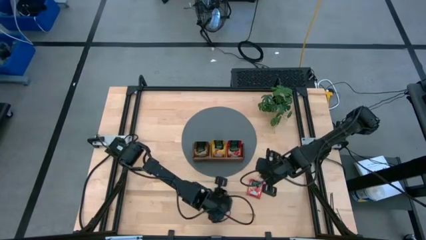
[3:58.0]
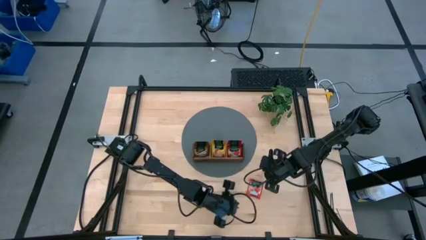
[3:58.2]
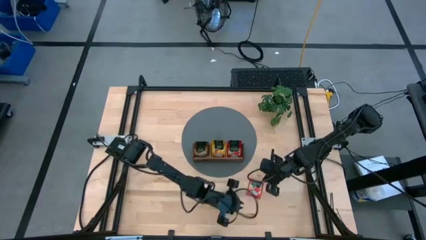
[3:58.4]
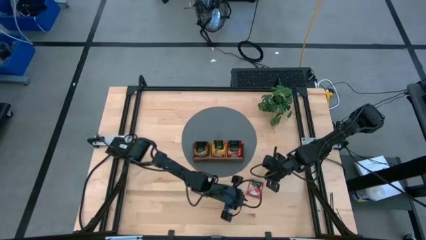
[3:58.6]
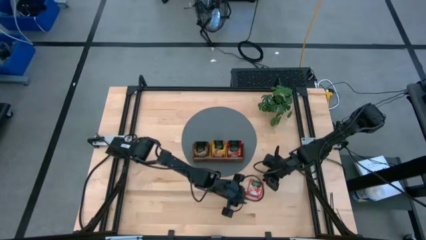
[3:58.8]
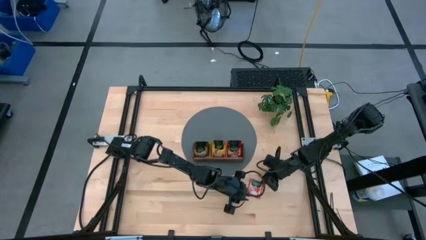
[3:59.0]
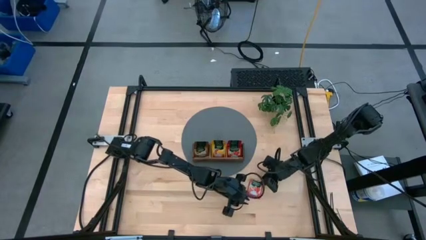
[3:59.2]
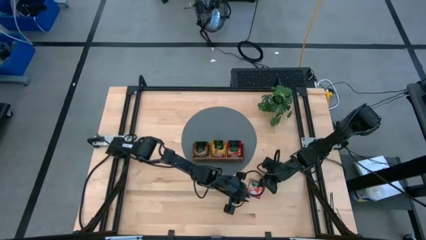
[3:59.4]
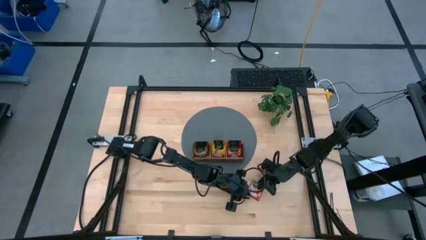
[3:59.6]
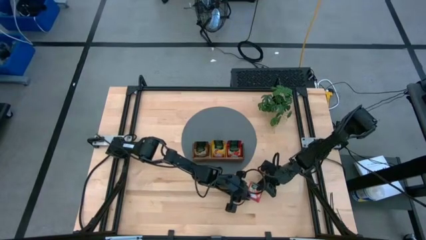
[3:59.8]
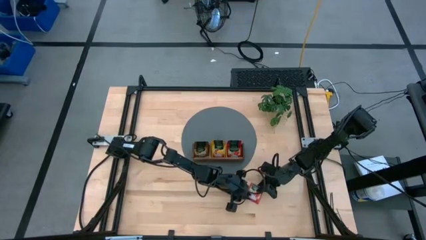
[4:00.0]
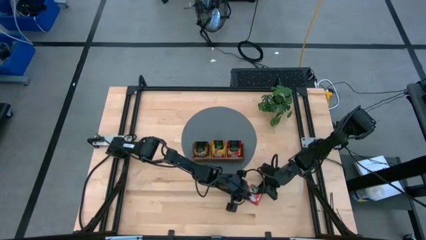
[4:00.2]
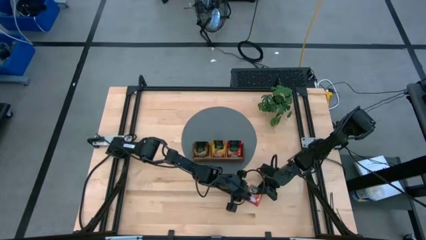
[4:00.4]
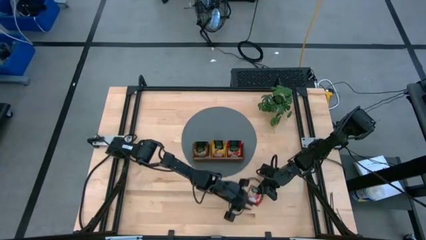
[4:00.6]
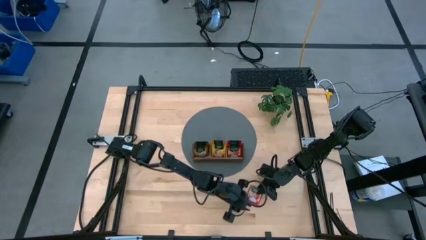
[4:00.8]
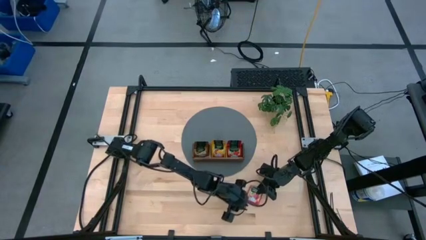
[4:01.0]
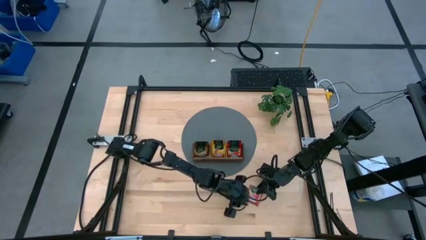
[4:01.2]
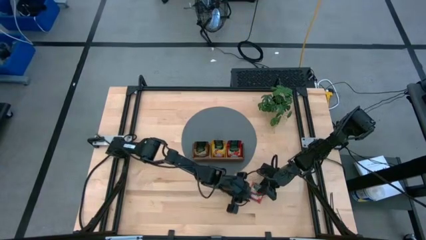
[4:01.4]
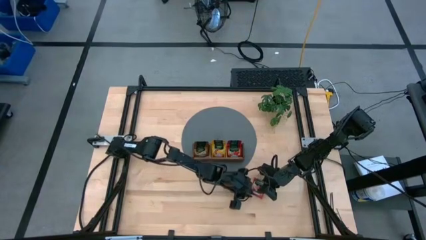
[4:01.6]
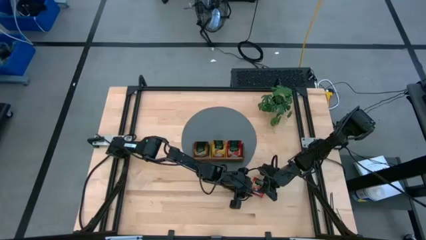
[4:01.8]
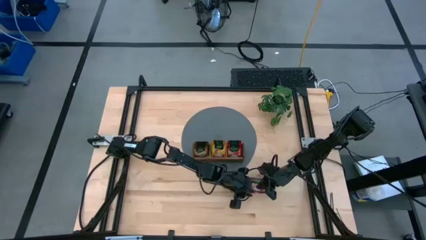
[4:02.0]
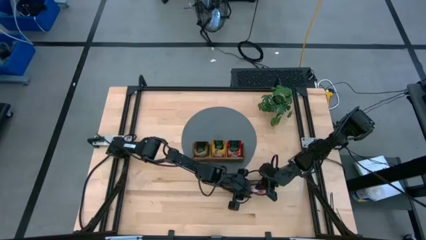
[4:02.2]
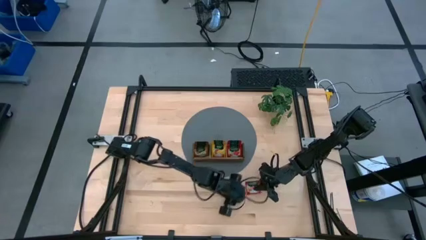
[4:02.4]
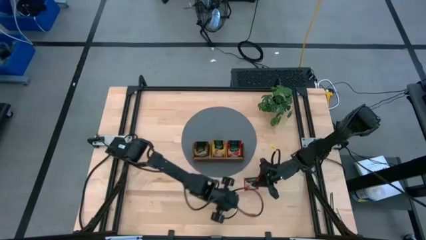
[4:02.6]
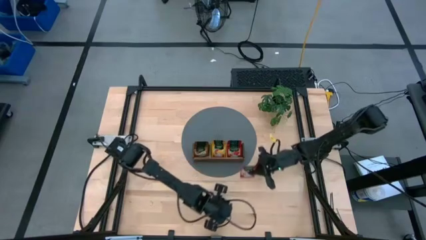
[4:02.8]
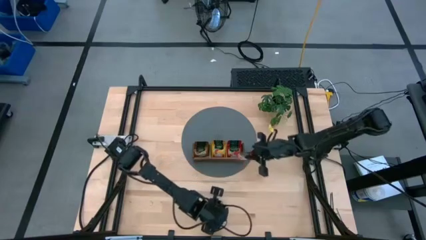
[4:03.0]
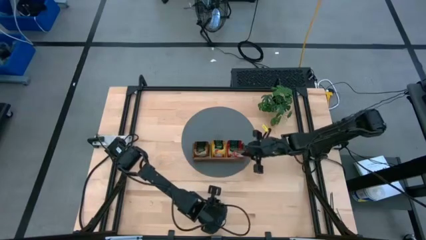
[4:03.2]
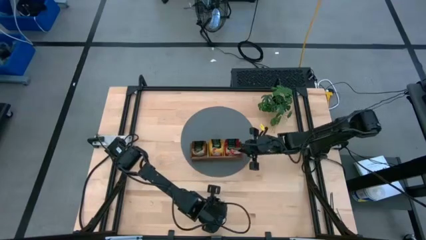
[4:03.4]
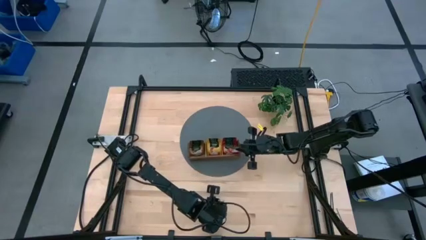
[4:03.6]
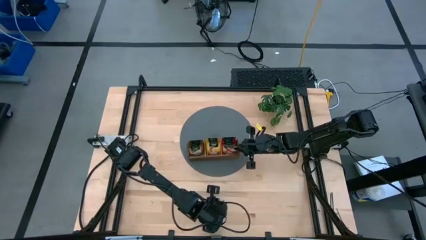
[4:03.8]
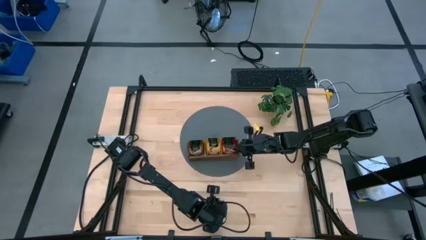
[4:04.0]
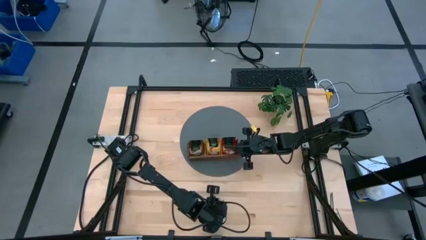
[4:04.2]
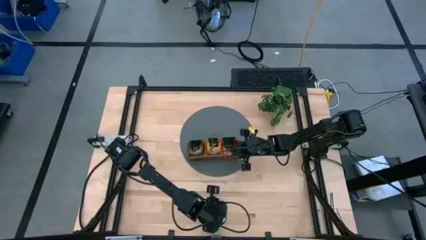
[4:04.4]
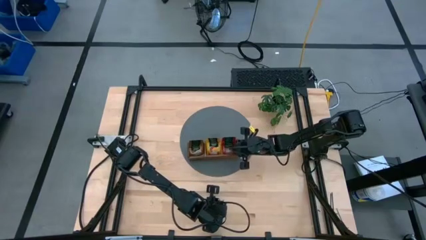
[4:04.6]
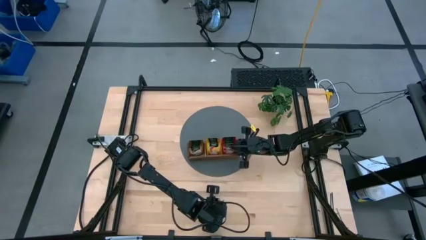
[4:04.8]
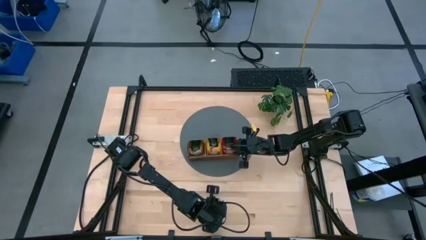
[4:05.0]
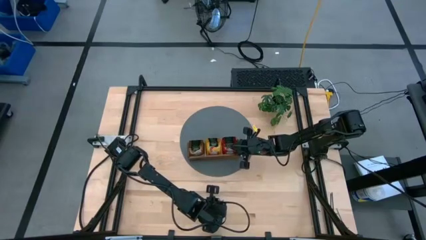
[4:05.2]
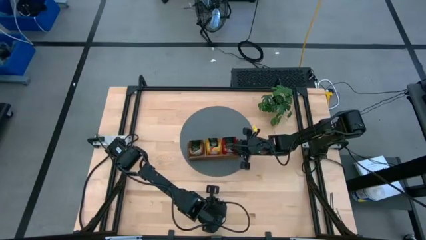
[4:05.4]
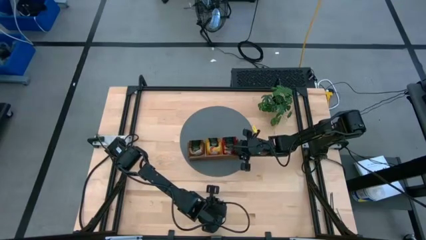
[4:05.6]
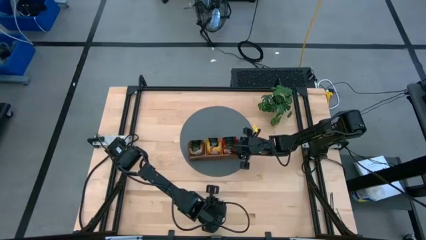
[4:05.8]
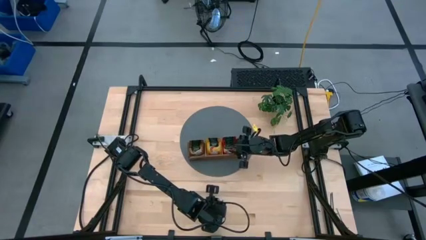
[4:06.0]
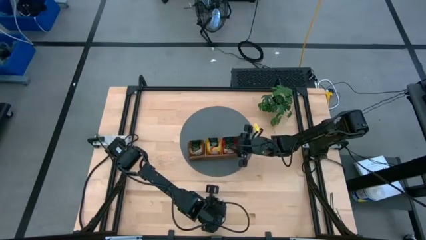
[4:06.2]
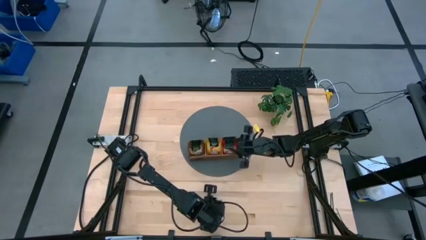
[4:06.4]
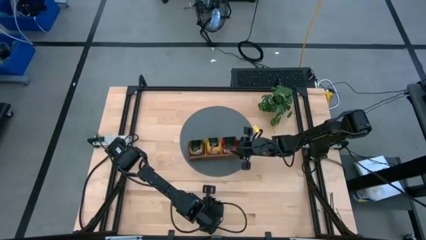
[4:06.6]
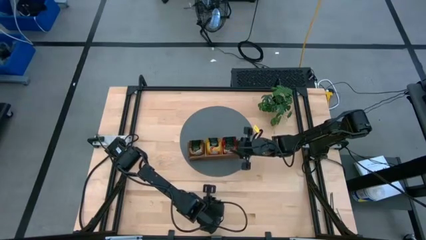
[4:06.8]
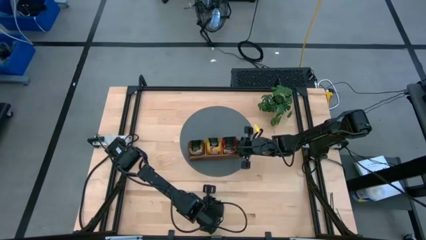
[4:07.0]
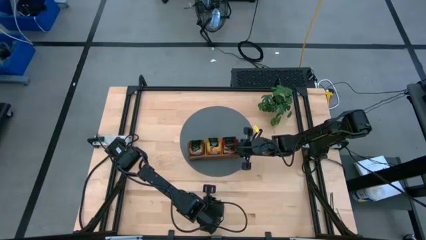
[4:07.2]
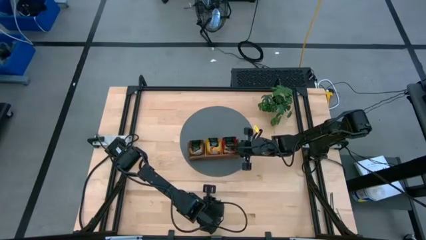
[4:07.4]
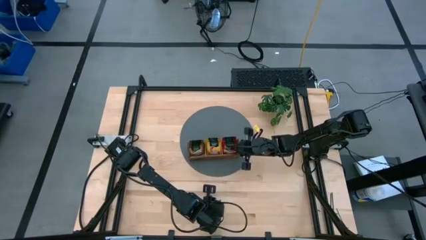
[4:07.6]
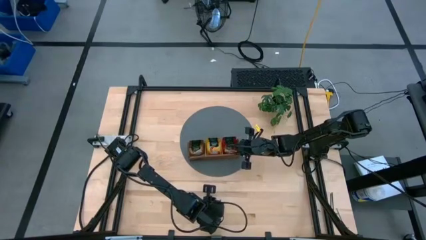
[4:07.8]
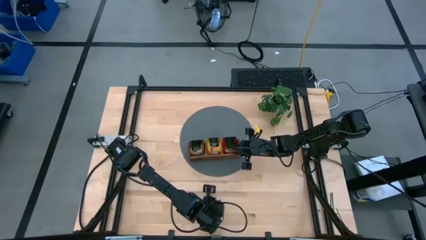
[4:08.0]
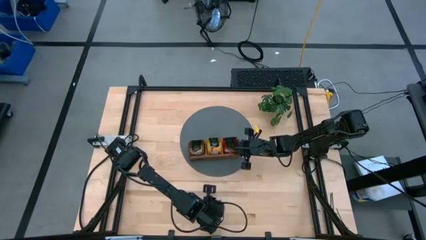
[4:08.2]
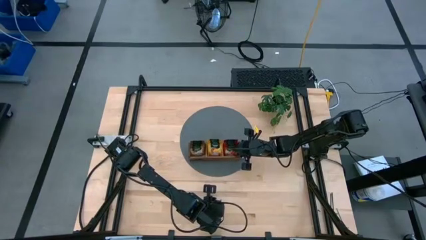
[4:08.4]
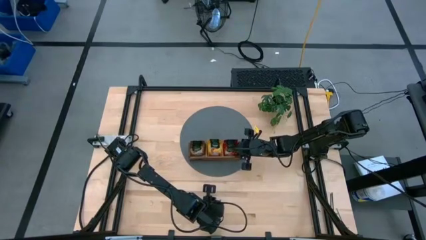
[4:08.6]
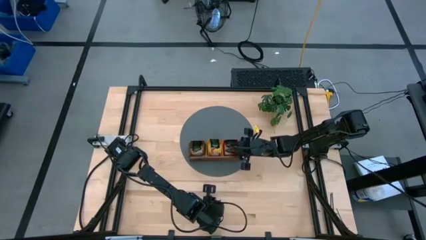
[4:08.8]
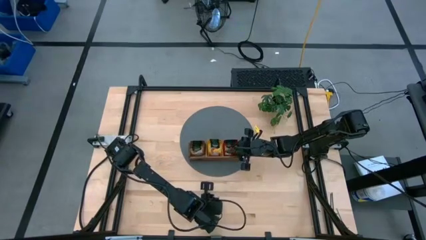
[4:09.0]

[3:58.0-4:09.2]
Task: Pick & Place Tea
Put the red tea bag into the right section of the wooden organizer
